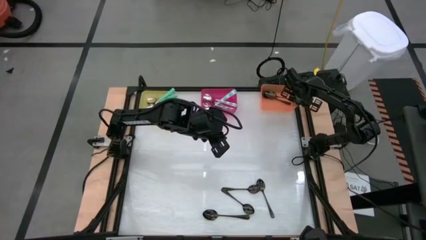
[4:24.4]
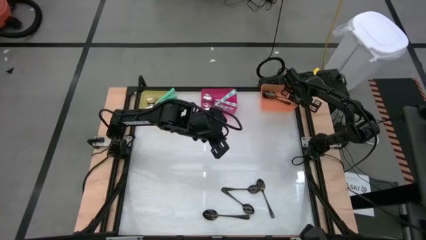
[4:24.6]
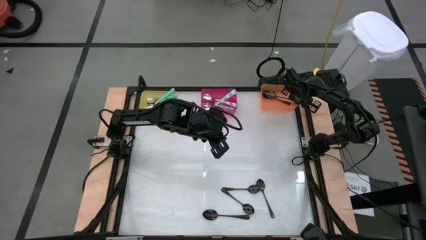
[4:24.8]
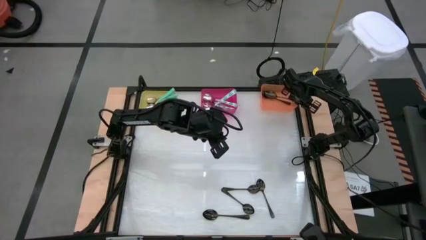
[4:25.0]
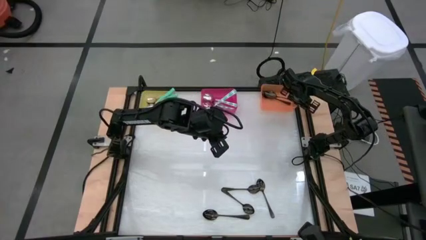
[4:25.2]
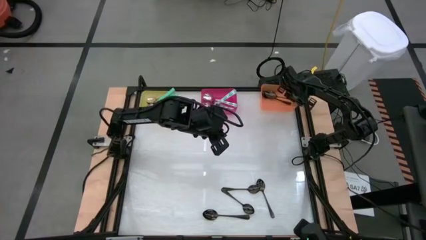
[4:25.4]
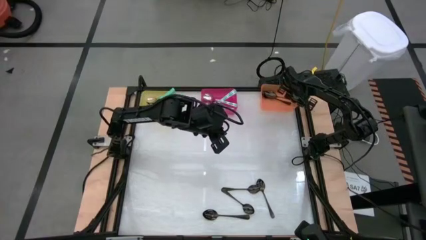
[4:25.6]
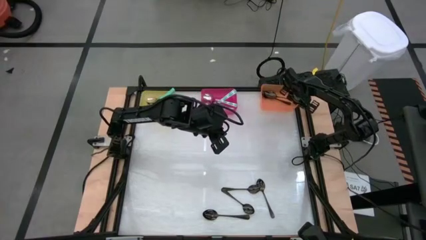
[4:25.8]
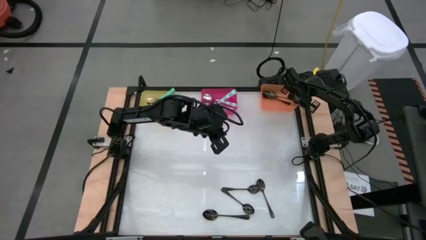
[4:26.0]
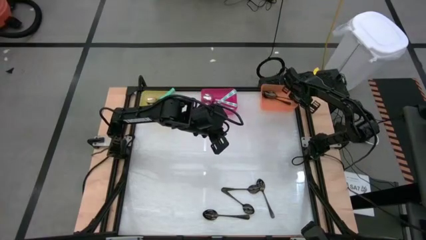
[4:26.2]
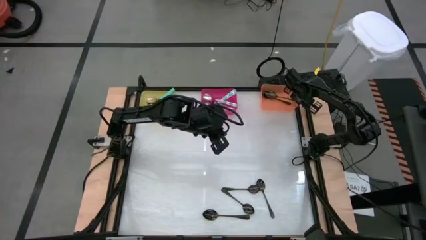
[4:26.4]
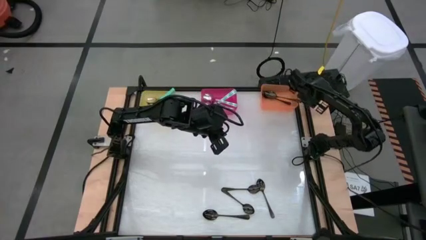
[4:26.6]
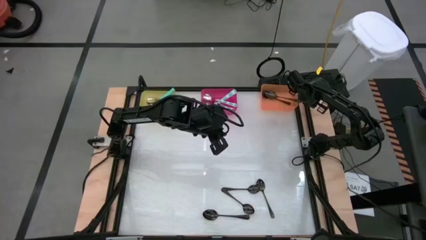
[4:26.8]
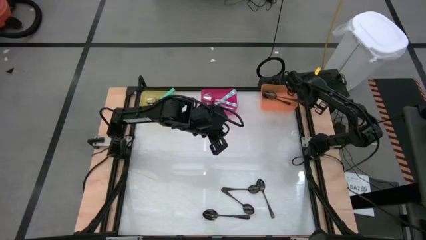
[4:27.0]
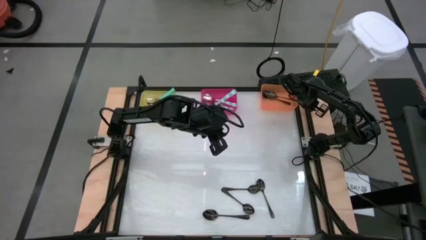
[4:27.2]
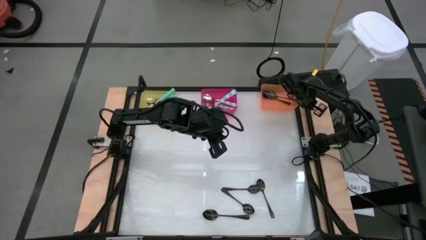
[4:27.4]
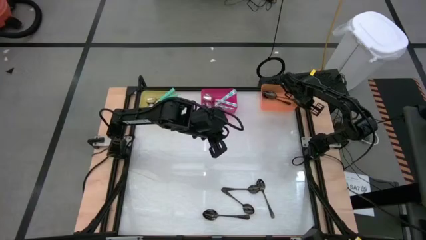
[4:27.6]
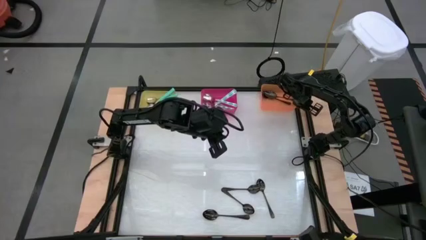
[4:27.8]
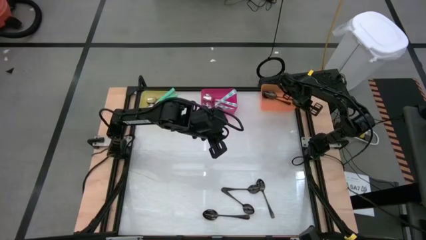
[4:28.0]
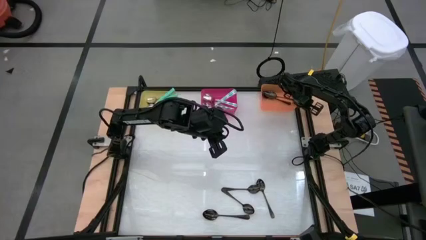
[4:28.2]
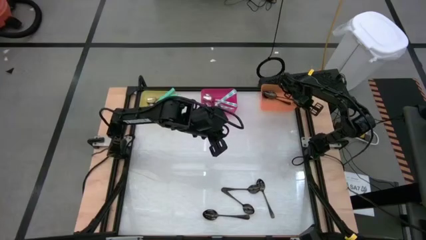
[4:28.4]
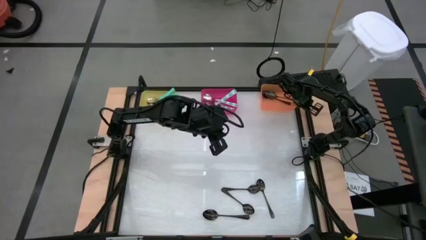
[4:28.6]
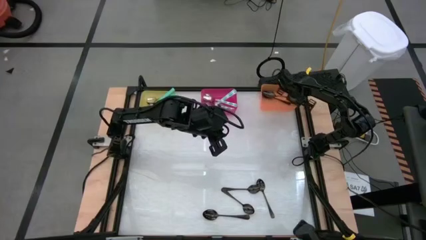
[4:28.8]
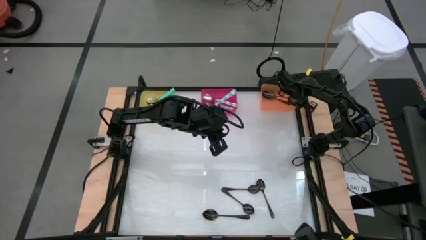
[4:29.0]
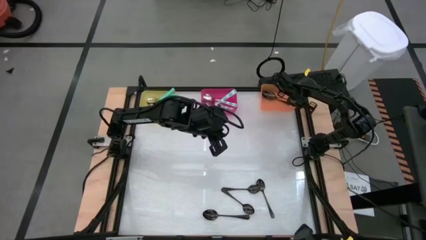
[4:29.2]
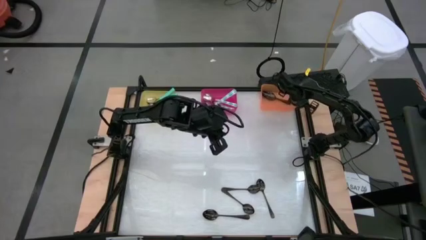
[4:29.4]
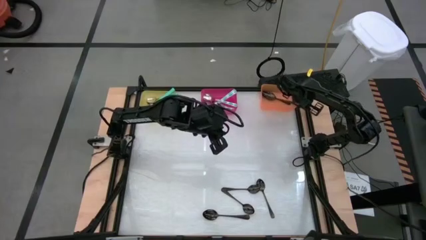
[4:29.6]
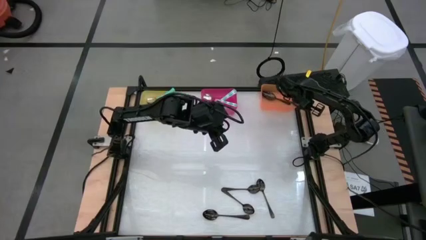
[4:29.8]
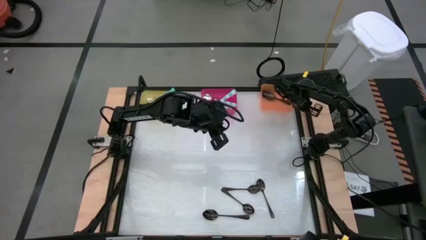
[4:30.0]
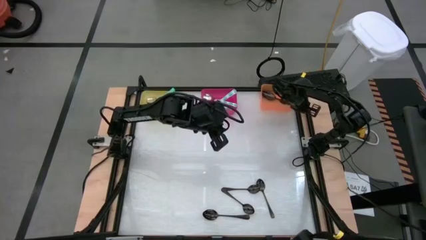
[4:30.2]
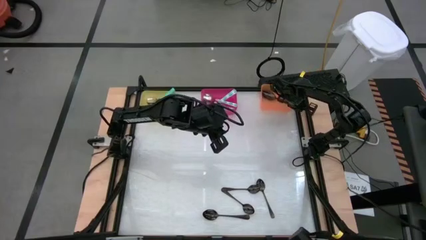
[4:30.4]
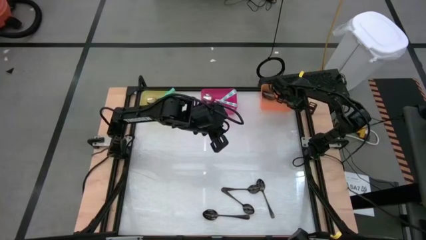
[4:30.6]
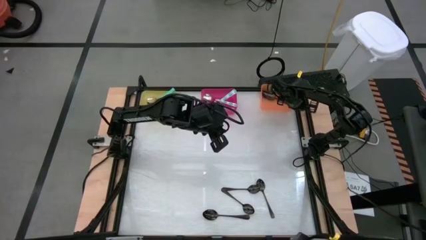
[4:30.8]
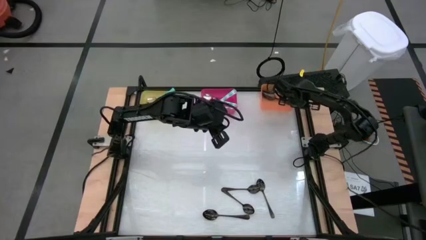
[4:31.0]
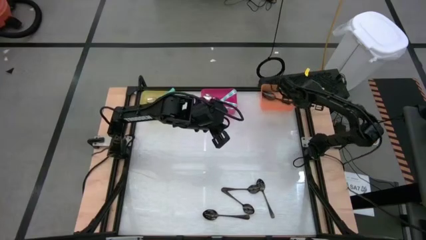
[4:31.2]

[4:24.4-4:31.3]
Task: Sort silverware by color (type)
Put the black spoon into the orange bin

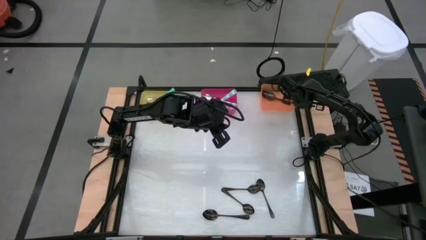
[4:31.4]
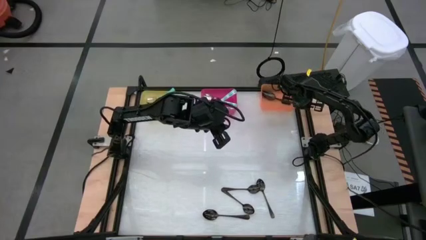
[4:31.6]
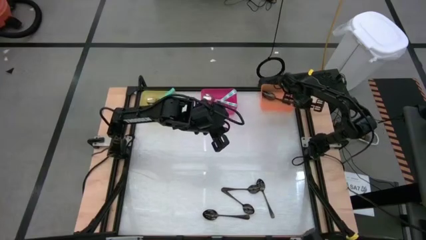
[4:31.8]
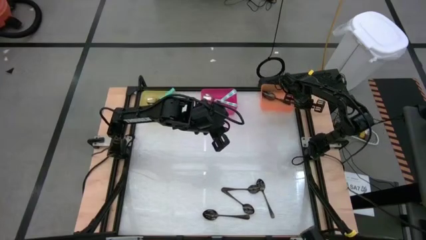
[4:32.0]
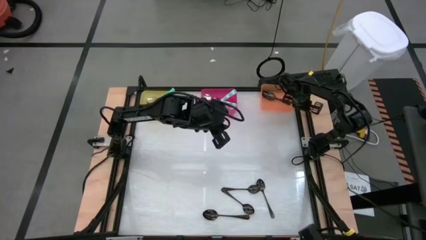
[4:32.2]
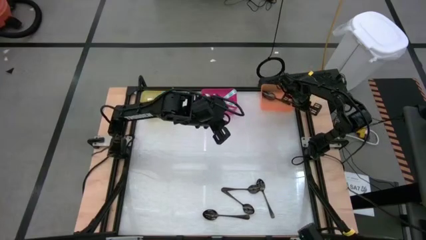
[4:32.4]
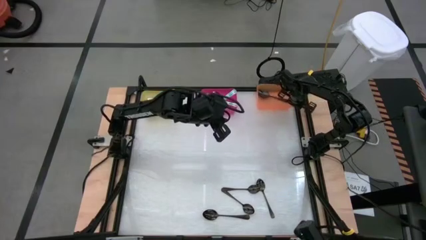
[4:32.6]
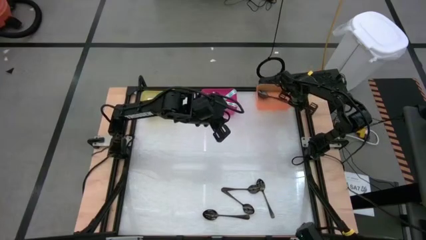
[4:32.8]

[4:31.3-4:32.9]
Put the black spoon into the orange bin
